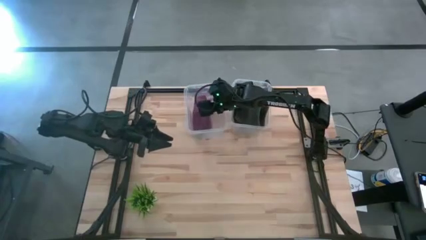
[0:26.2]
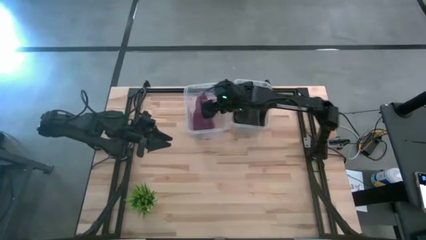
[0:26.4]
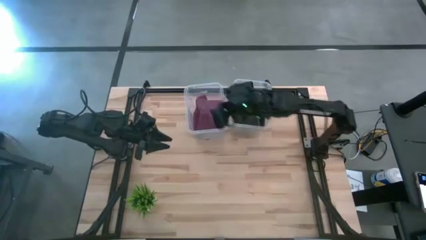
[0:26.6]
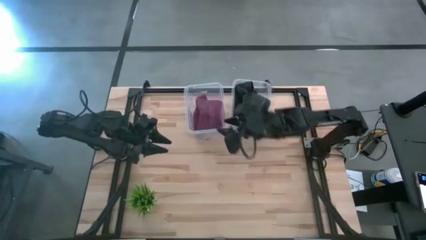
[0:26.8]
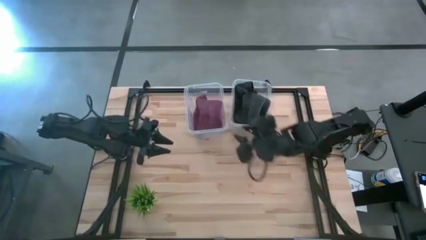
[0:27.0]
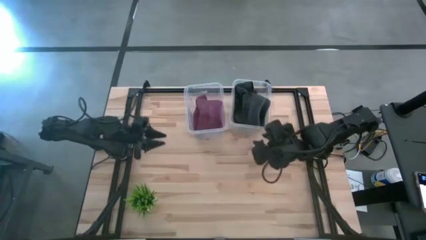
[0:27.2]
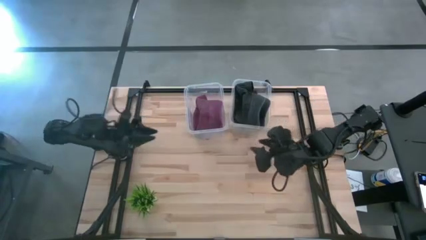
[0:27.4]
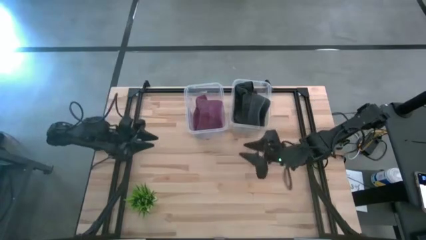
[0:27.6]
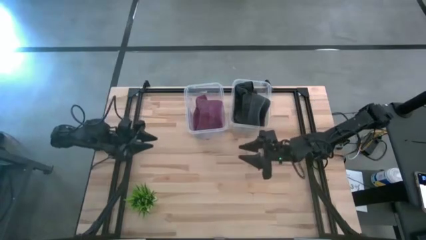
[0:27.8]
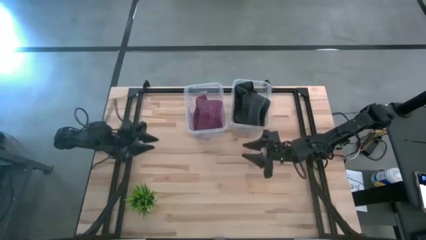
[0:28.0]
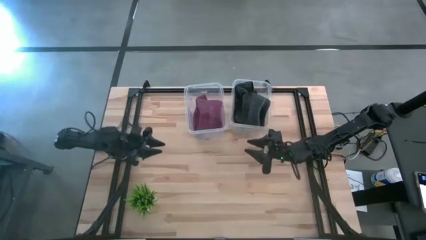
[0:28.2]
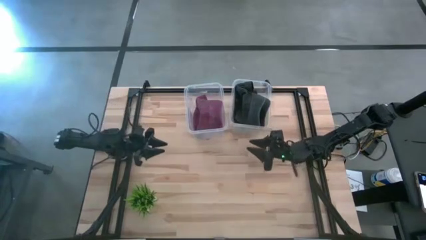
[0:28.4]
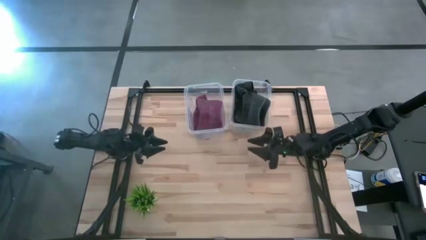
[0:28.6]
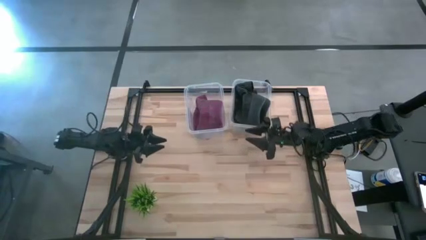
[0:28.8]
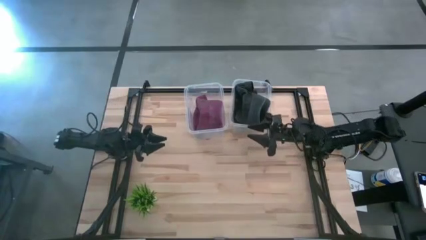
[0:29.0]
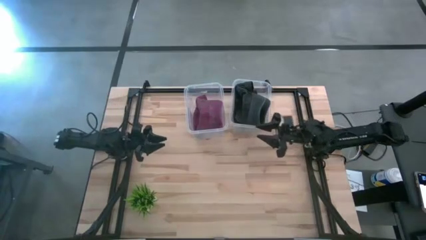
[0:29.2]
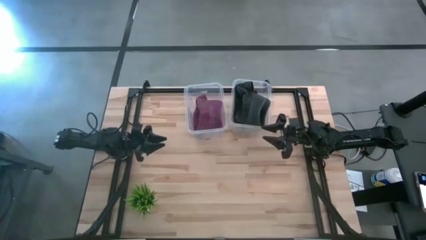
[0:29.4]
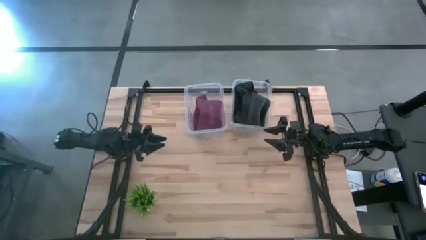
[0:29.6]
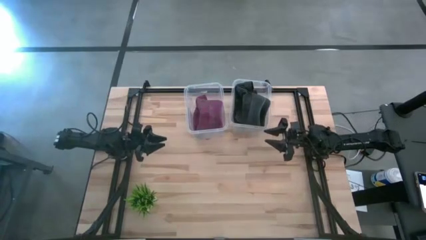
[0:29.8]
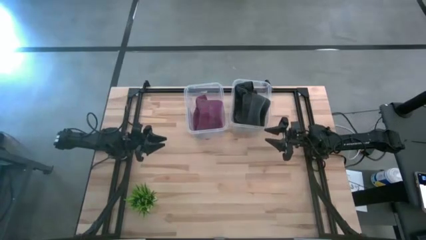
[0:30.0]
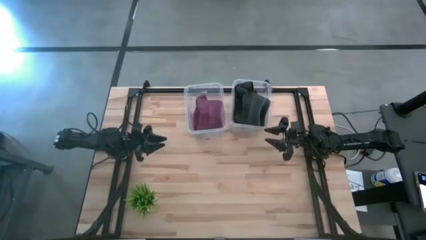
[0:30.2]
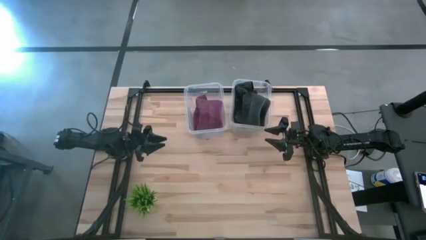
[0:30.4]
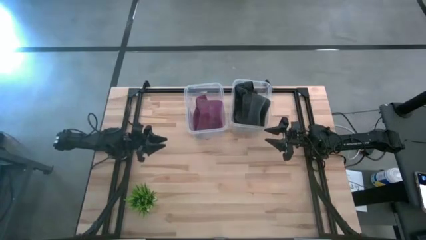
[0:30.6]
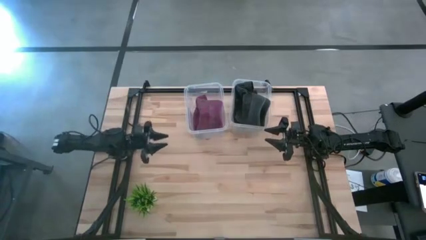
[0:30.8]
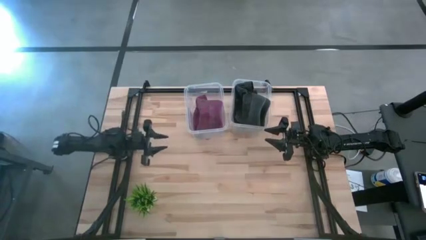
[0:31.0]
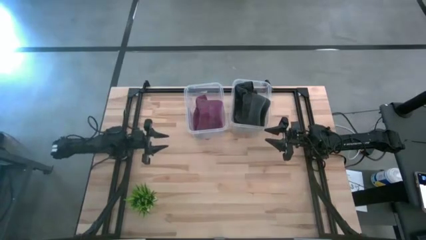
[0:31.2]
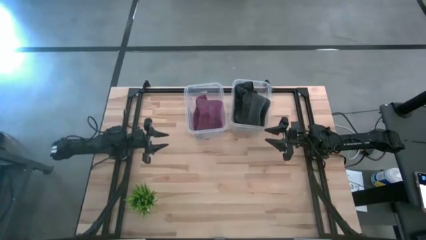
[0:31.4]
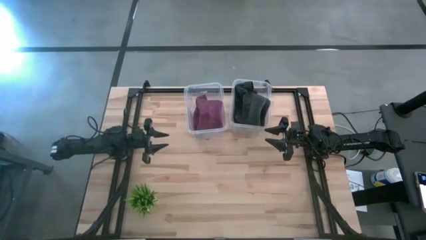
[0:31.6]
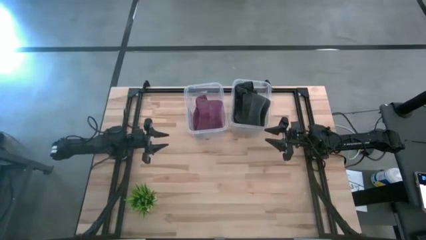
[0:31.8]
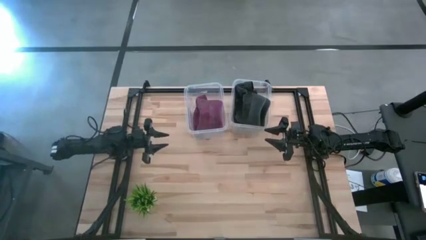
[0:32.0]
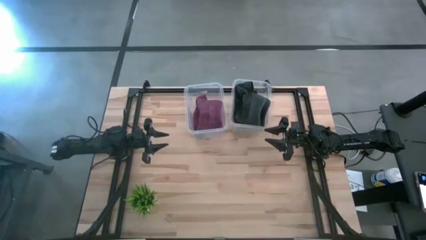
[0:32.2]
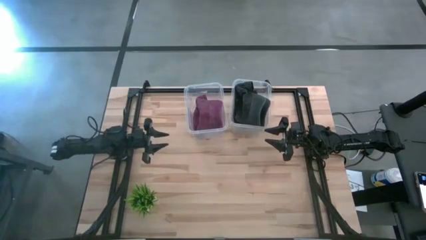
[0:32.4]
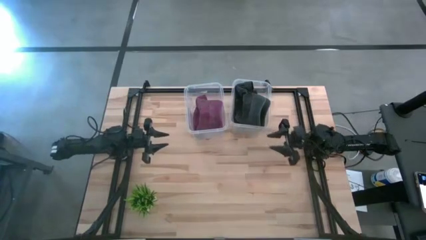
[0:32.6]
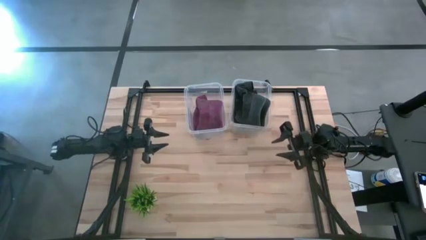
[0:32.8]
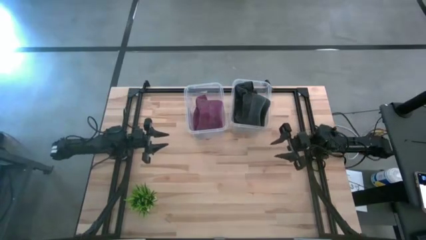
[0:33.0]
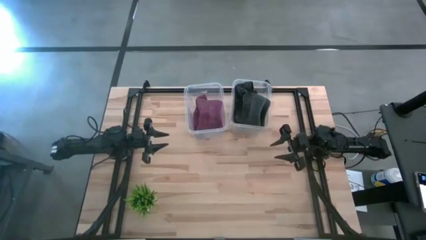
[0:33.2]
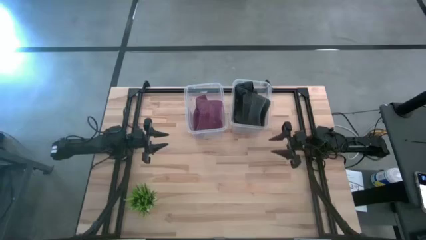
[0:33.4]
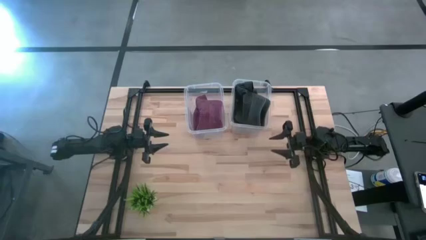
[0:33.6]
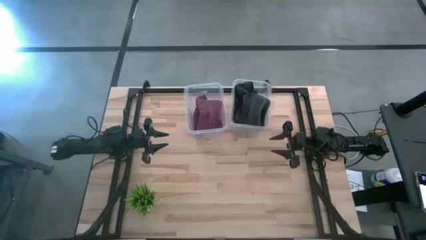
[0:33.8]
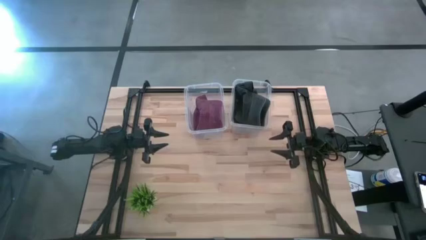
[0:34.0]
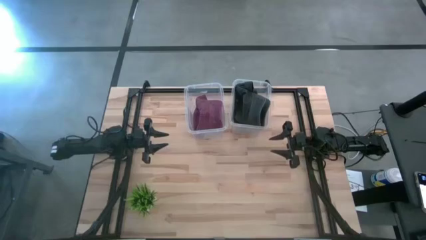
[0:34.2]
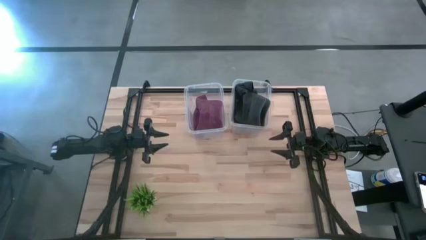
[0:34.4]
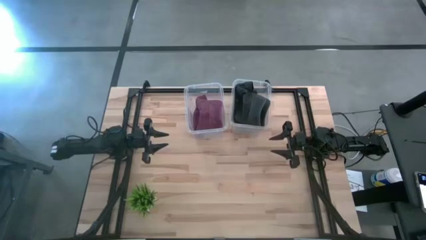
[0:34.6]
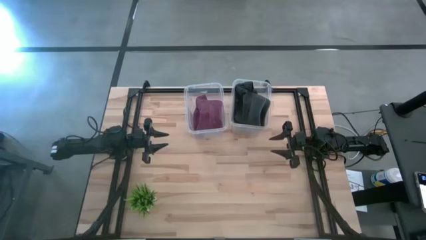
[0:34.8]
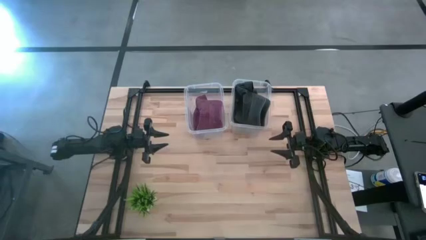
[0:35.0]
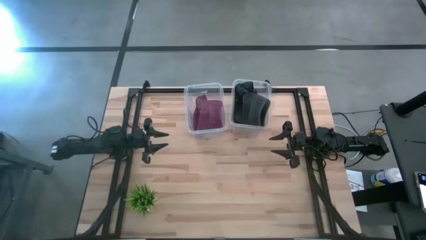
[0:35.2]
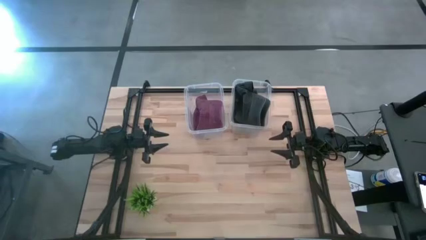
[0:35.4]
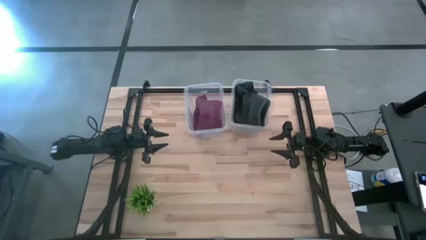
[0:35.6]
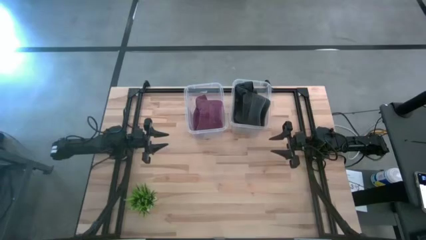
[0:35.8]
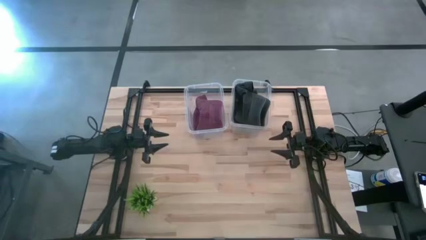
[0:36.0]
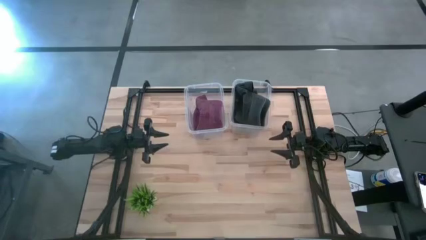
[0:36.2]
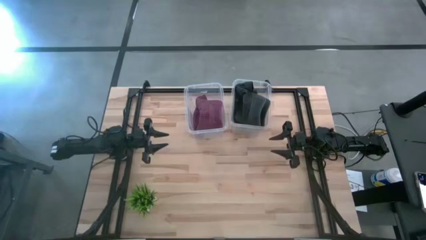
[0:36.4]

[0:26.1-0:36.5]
Task: Pick & Place hat
Return to Home Position
